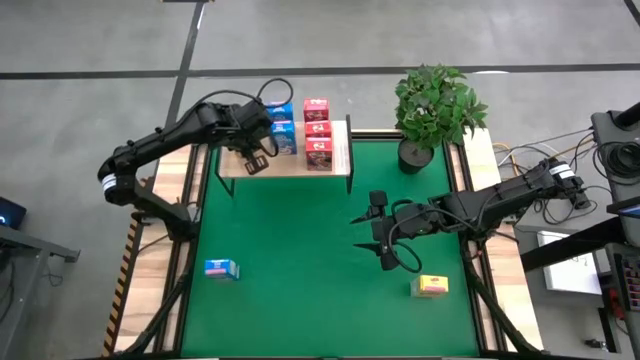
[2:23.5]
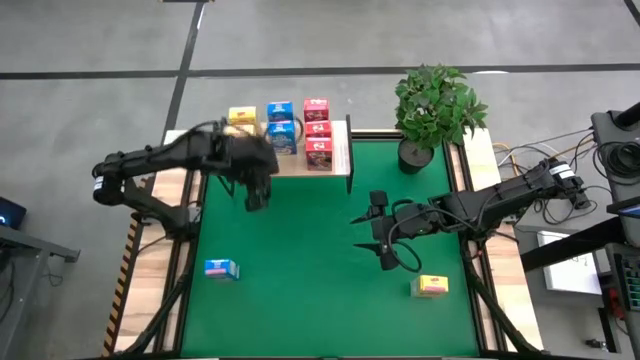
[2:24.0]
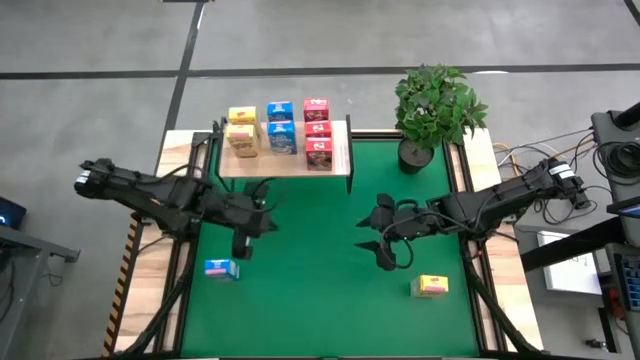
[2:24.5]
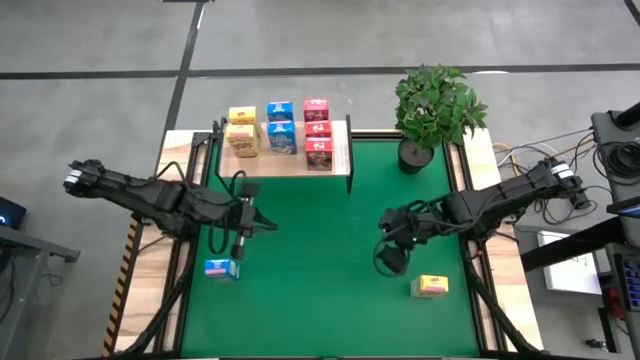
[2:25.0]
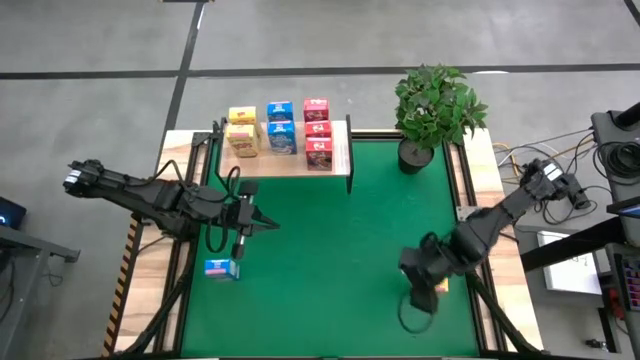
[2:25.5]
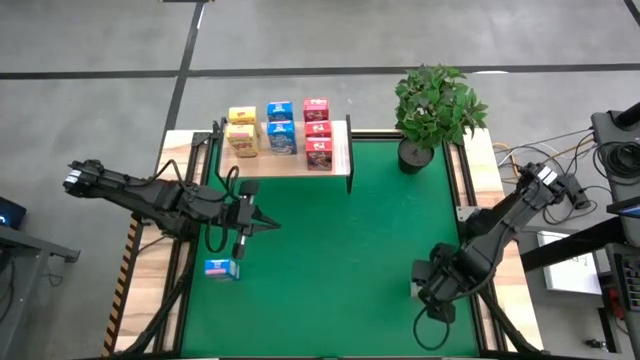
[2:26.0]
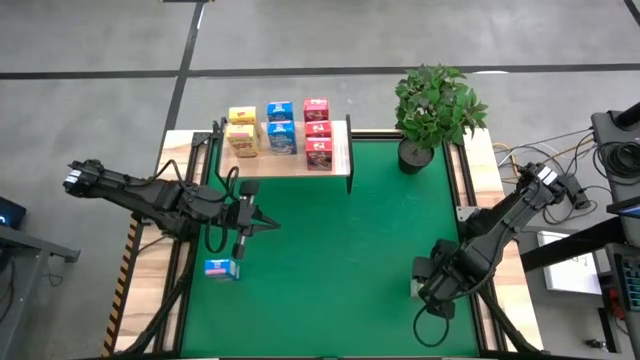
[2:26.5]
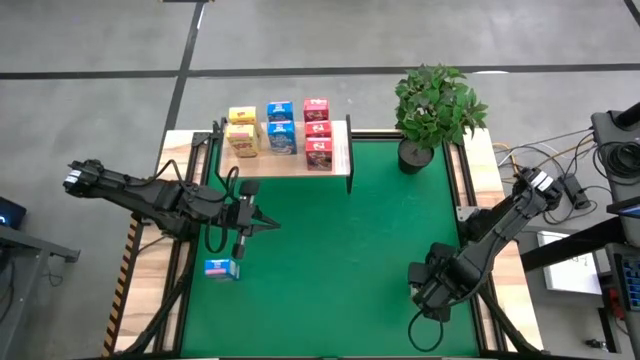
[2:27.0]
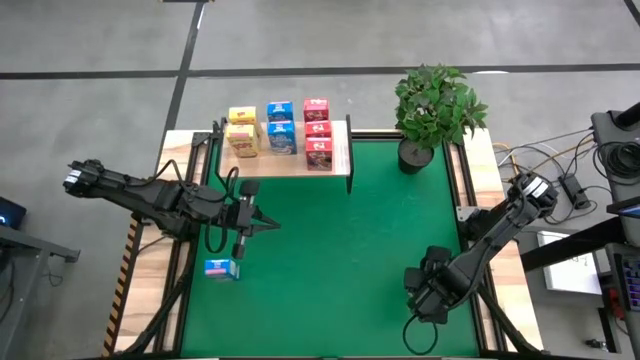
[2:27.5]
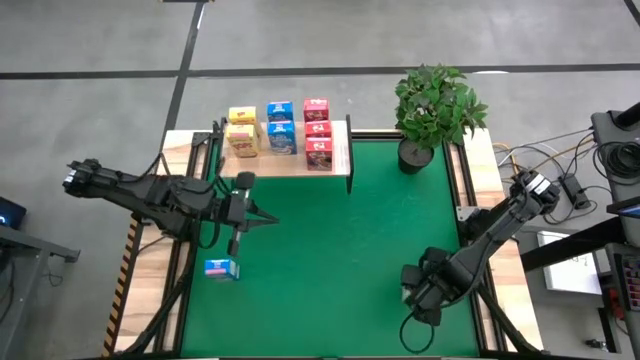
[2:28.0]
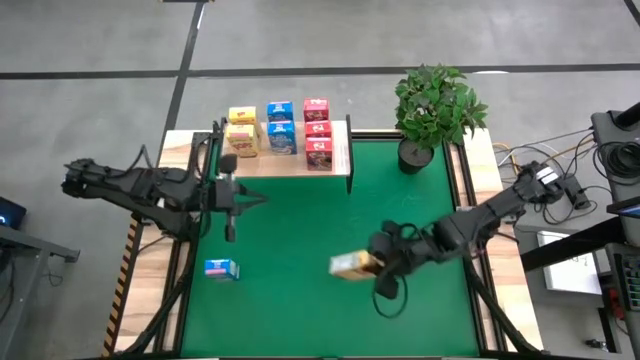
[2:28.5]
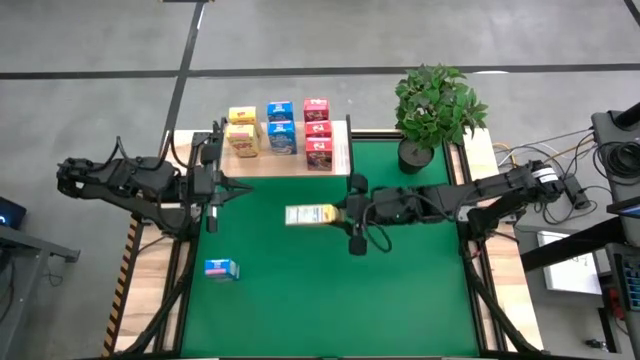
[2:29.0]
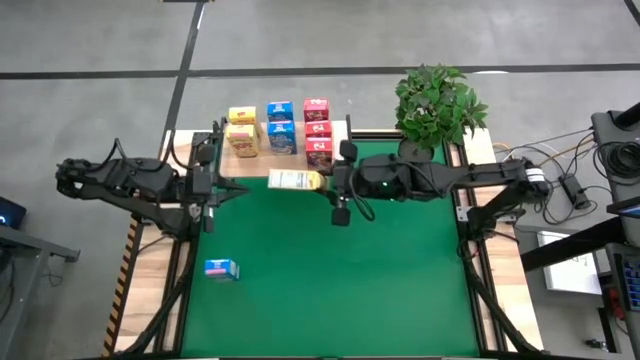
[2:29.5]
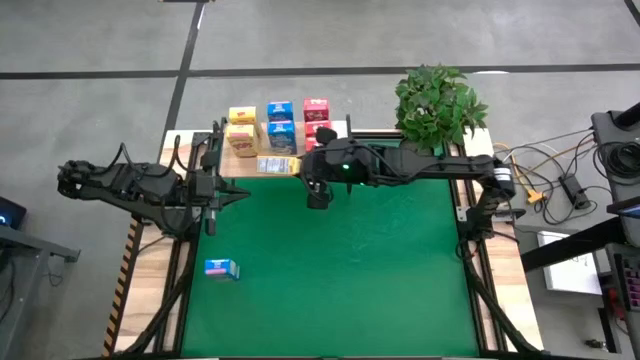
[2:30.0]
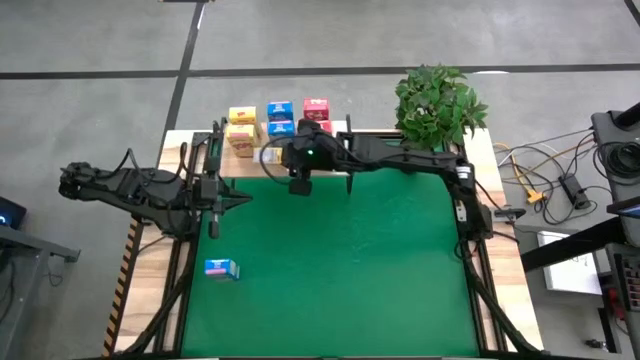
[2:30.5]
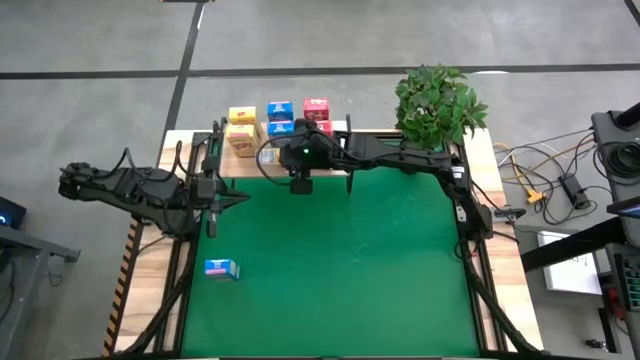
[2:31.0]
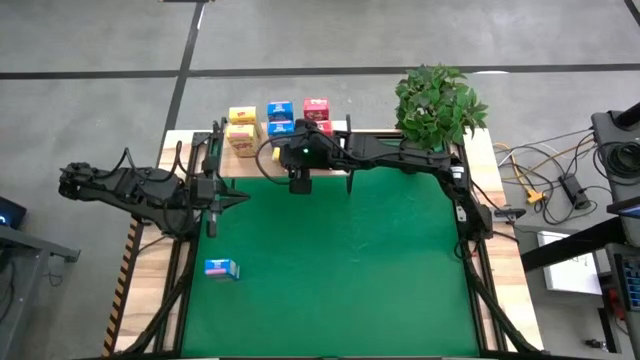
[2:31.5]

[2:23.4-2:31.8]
Task: Stack cereal on shelf
Put the yellow cereal on the shelf

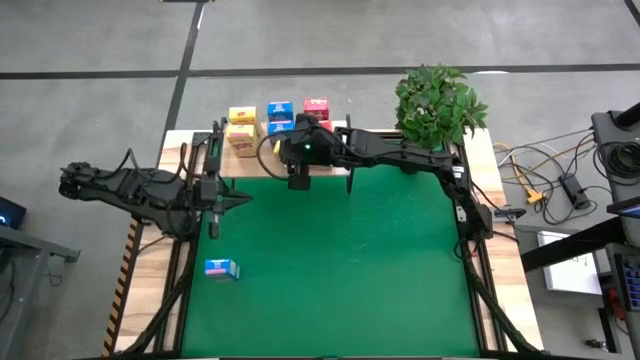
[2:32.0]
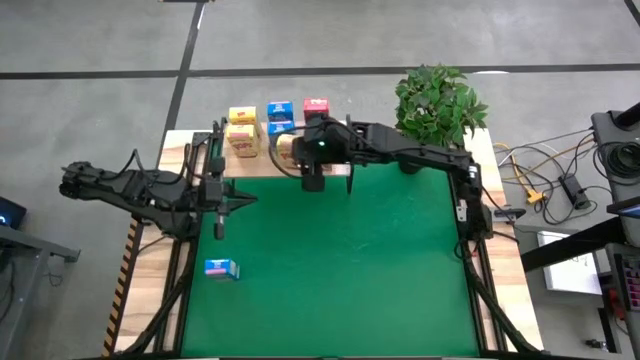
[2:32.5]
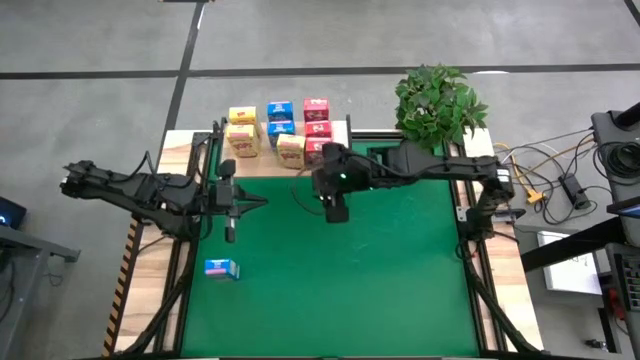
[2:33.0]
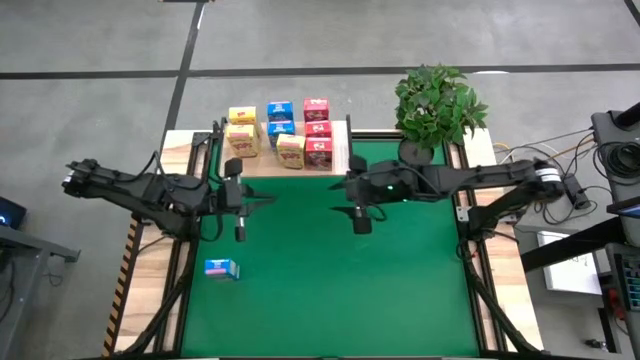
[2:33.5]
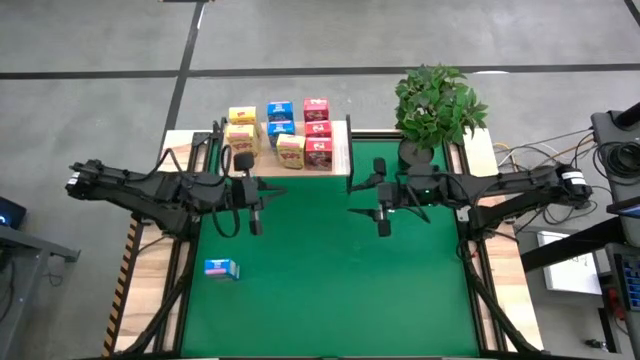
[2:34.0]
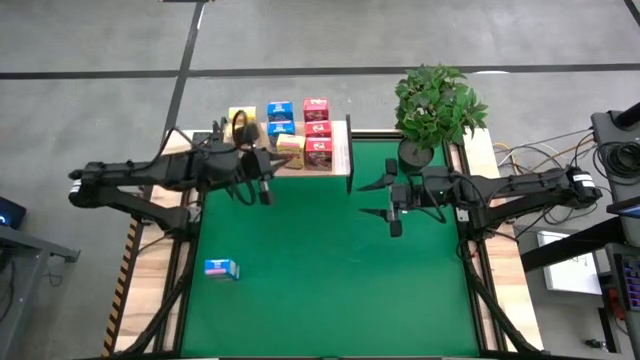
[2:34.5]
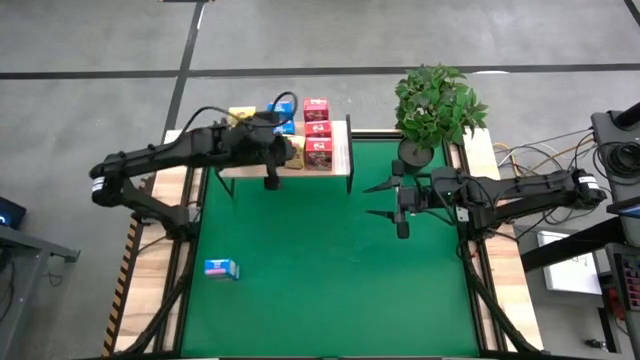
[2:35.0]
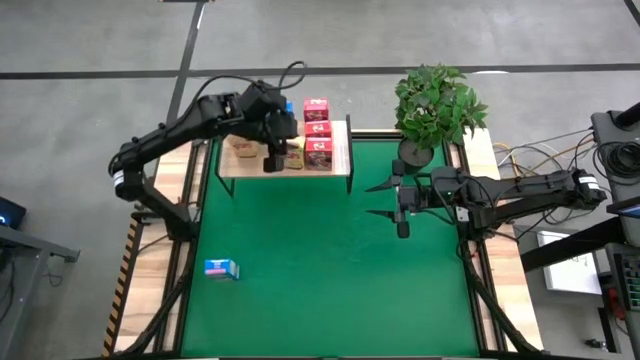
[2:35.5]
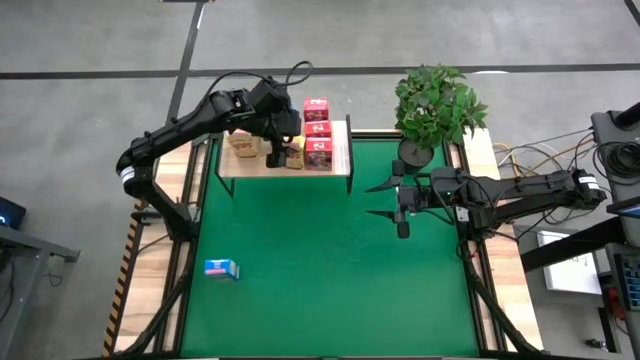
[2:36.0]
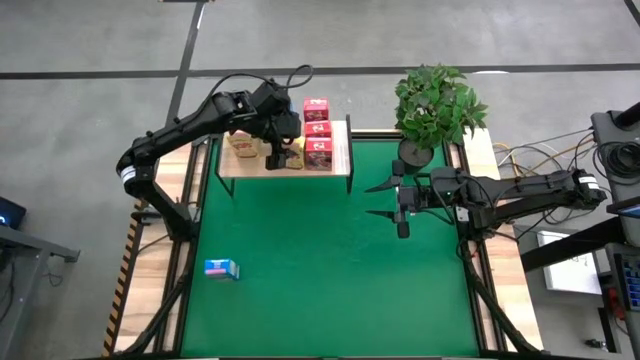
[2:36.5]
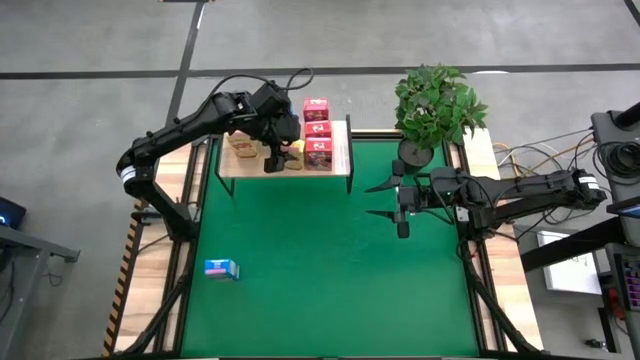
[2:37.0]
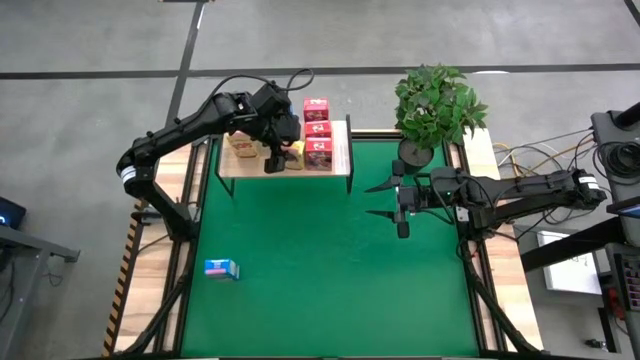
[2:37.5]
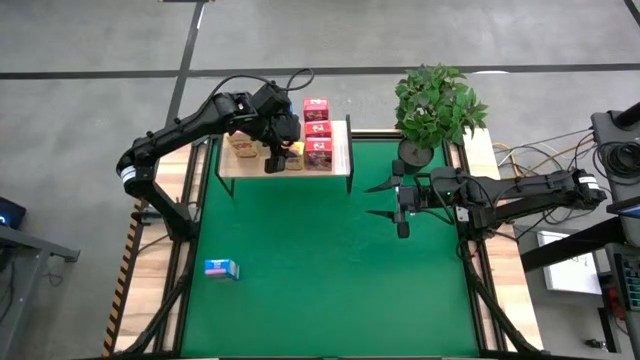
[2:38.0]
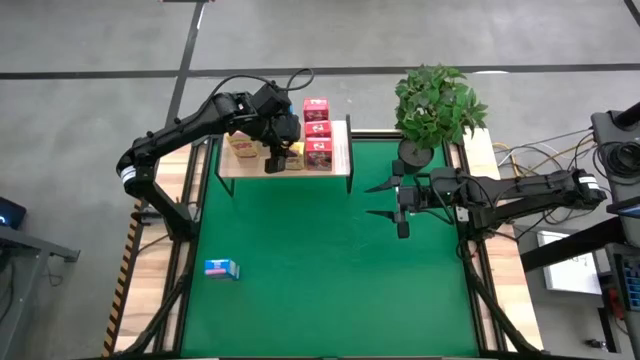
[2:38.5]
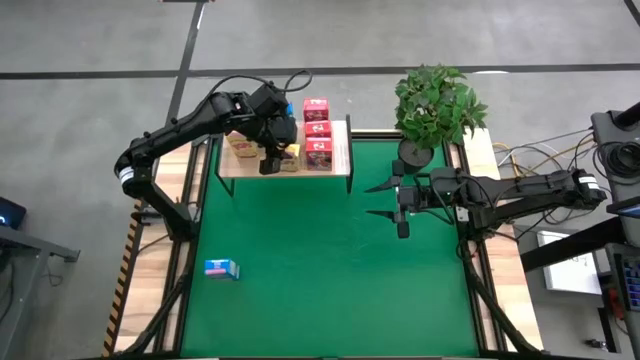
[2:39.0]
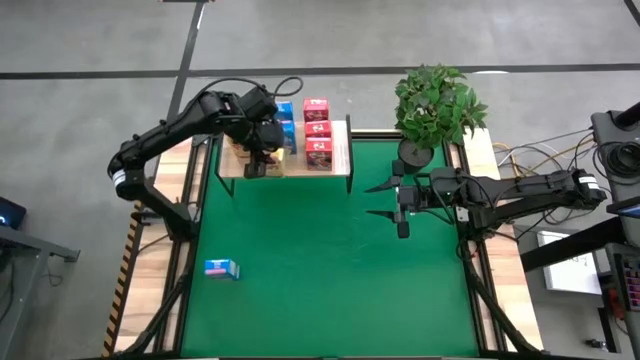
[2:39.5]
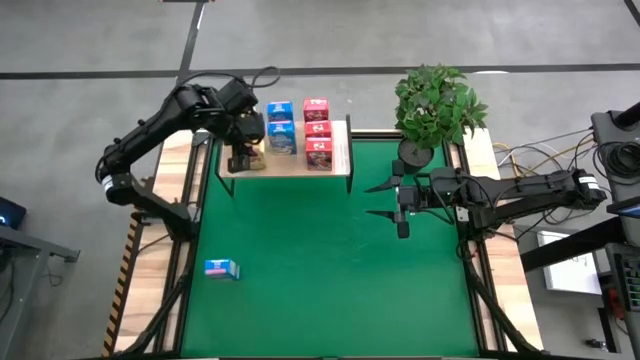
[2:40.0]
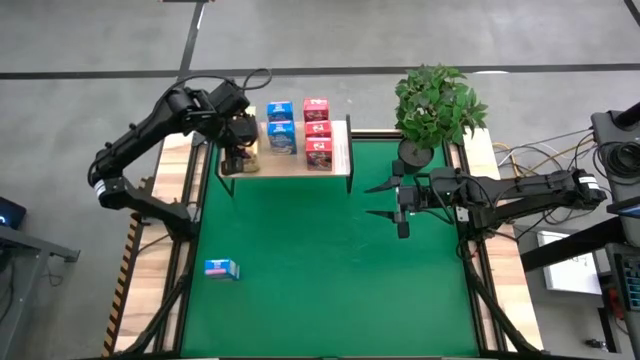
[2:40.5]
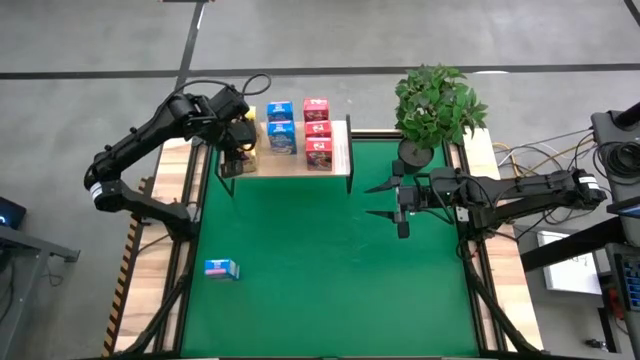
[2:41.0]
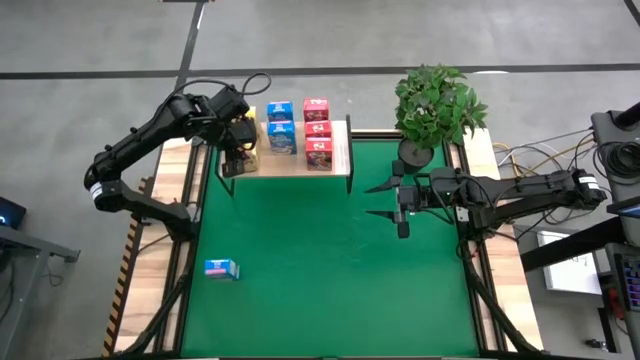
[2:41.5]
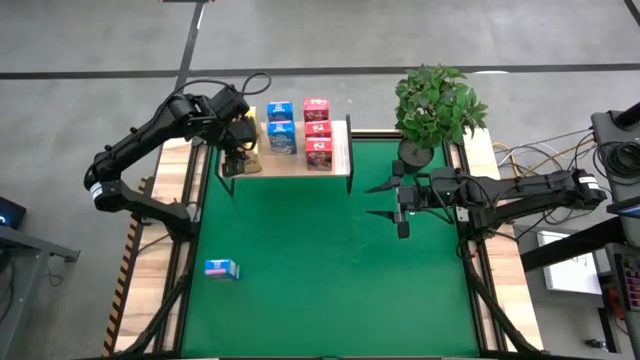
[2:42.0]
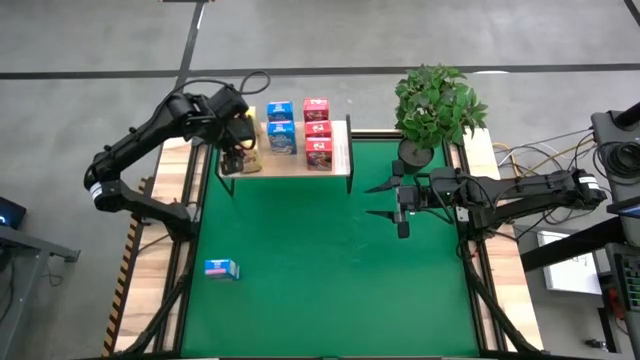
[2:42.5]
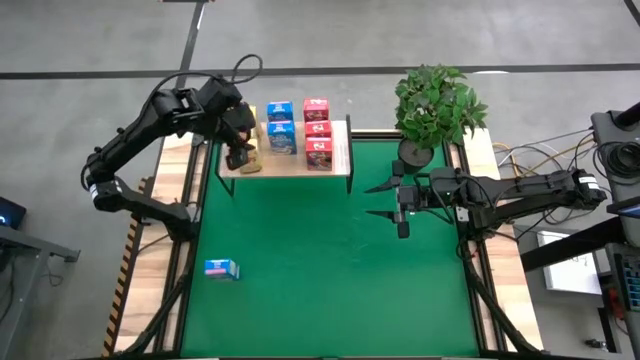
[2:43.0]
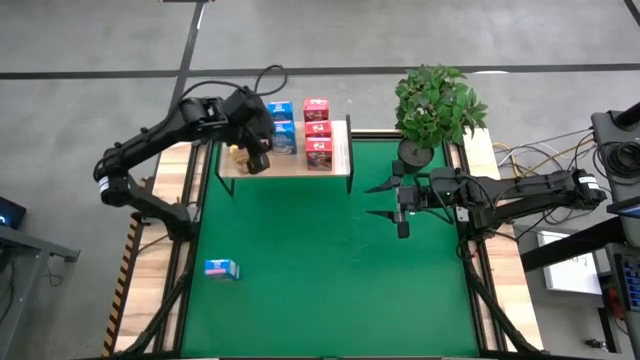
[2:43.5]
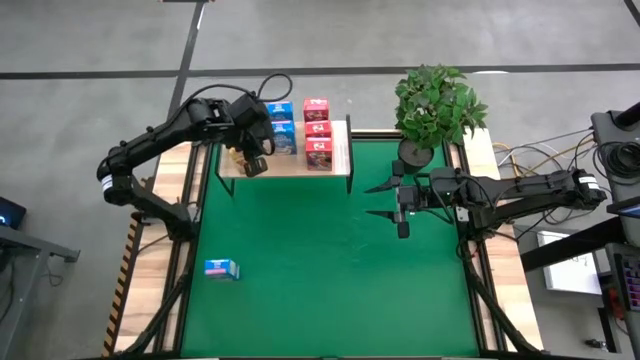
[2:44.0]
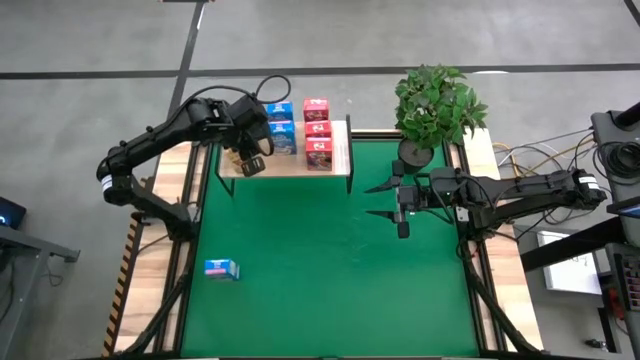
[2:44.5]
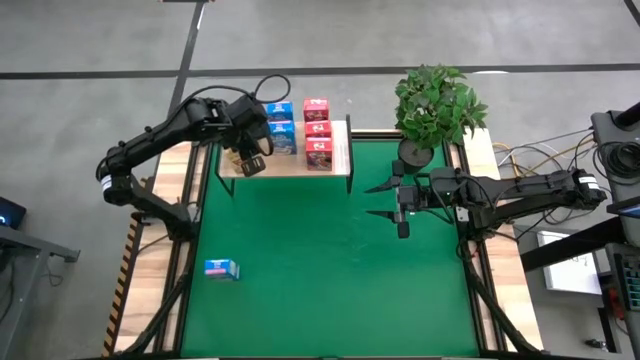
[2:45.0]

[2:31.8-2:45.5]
Adjust the yellow cereal on the shelf
